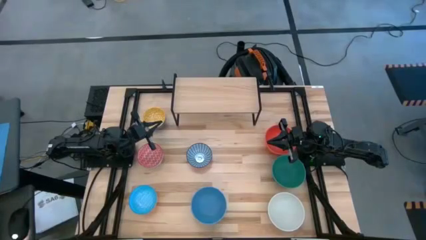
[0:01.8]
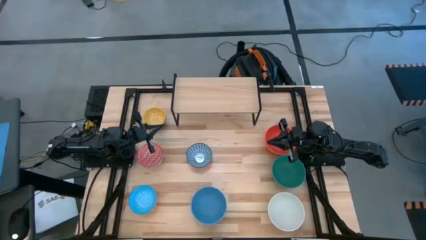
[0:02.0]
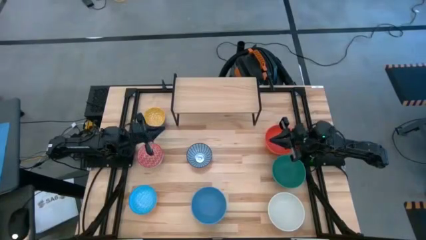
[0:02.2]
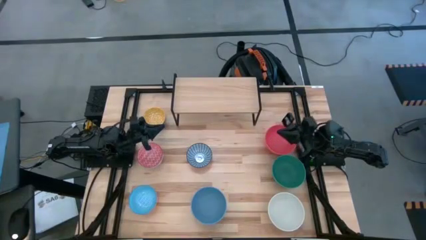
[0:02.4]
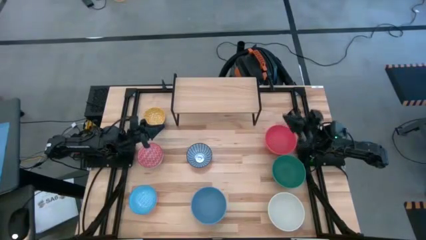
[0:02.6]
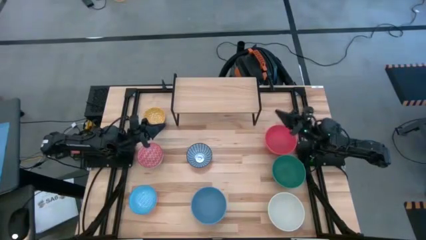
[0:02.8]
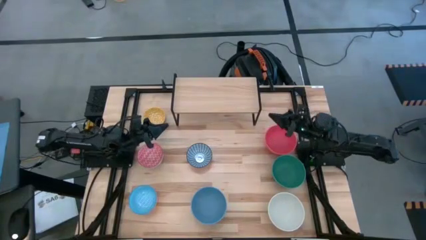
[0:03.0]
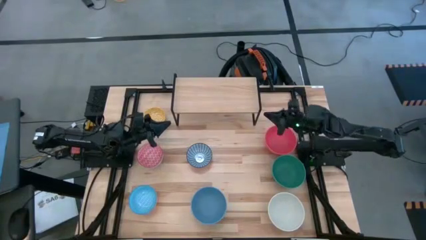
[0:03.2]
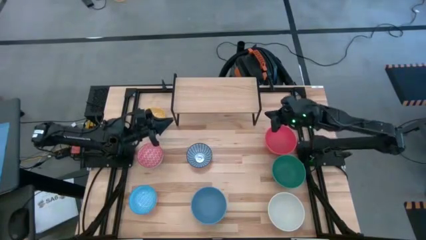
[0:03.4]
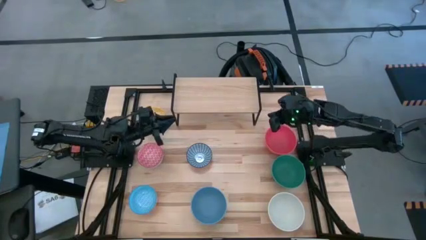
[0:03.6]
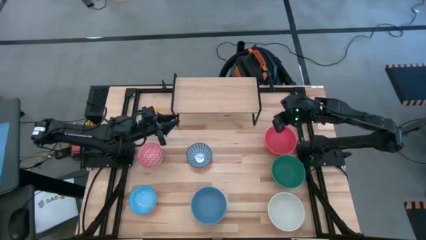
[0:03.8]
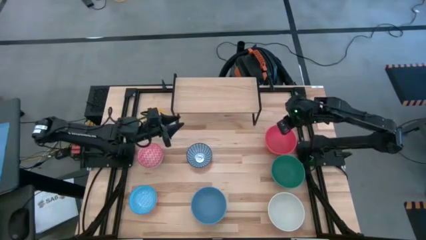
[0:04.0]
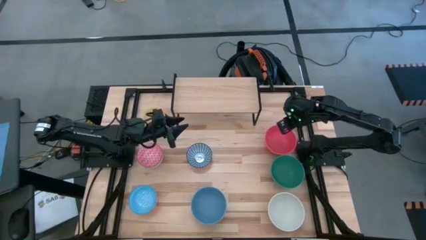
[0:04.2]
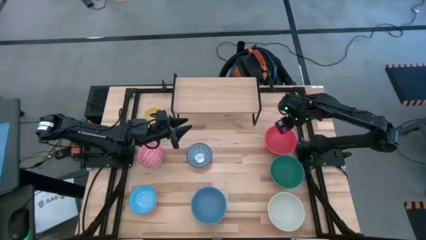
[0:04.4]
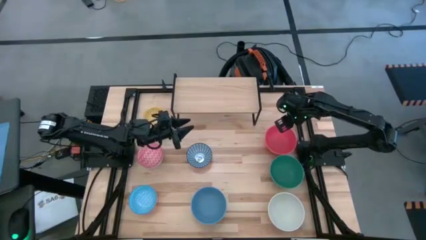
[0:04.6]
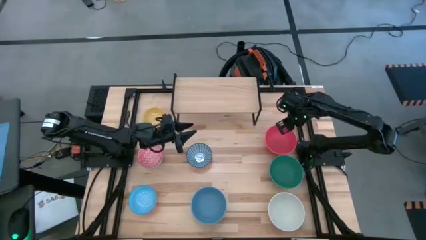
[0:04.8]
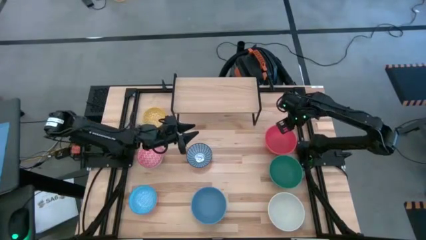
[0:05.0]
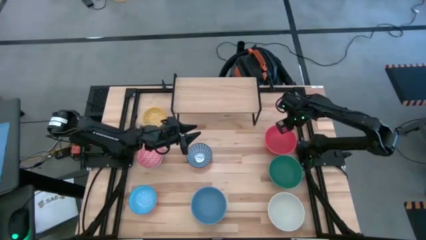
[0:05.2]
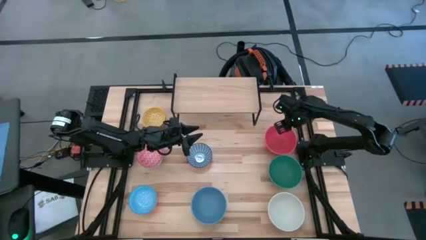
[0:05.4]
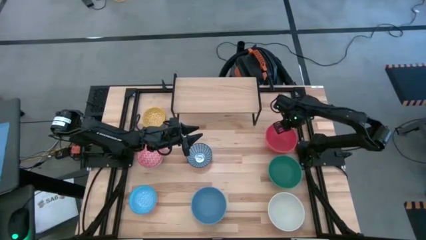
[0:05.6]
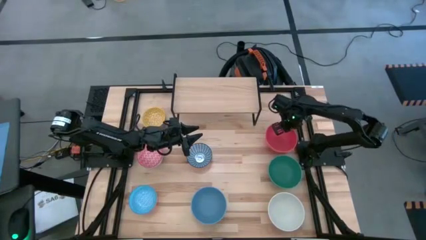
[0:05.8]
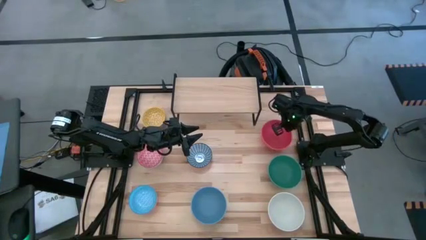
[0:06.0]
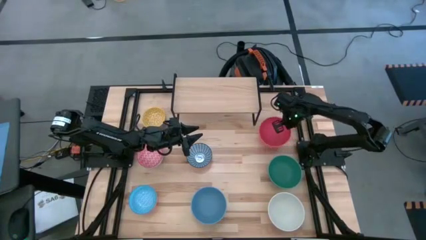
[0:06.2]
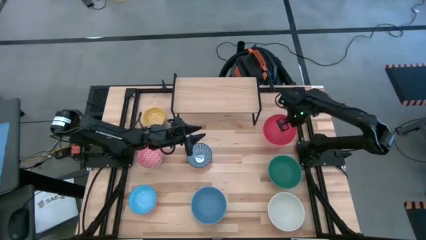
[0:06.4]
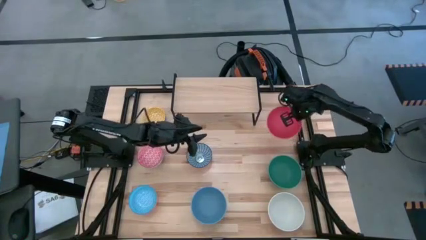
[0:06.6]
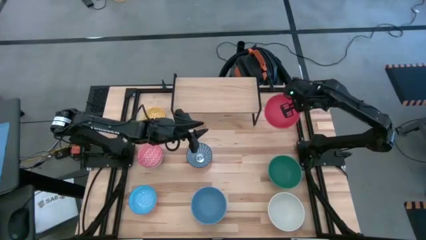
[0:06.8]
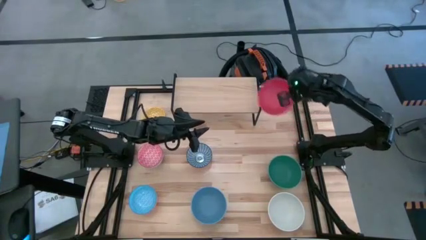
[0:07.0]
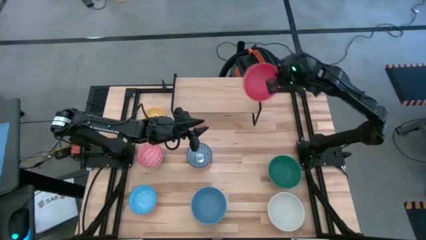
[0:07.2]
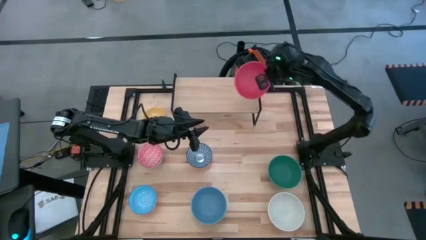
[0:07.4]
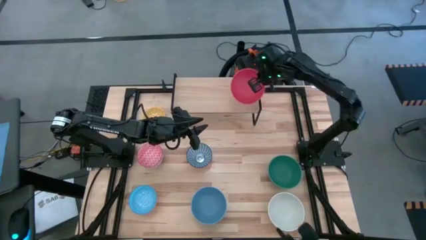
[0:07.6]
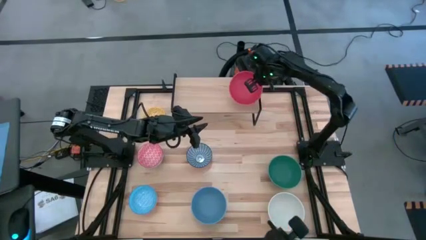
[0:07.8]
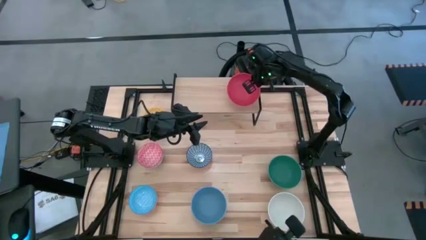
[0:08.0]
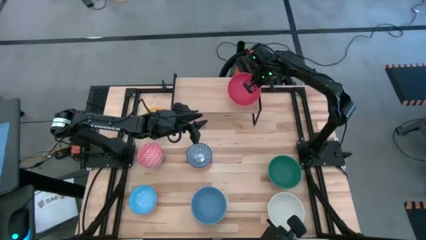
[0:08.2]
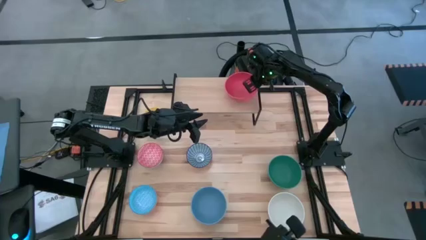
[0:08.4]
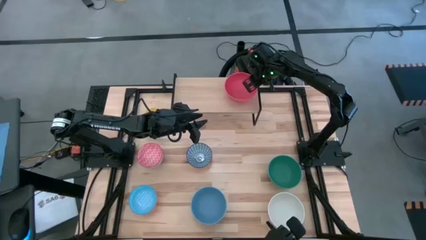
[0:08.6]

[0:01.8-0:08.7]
Task: Place and stack bowls onto a shelf
Put the red bowl on the shelf

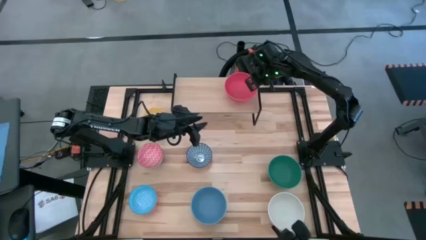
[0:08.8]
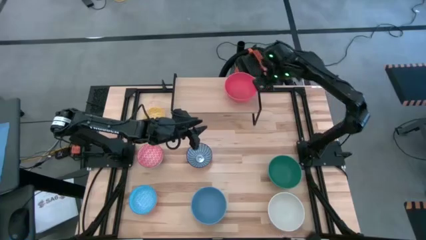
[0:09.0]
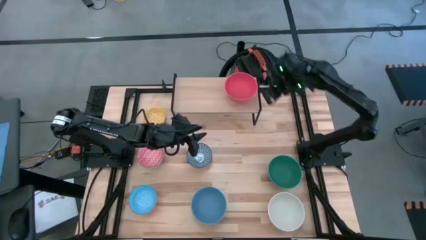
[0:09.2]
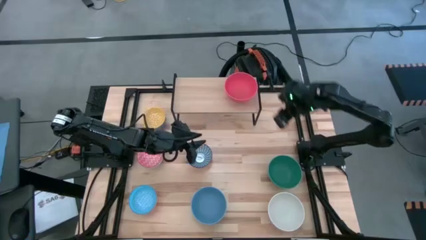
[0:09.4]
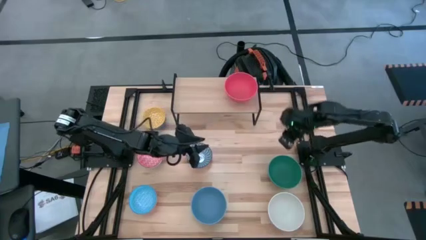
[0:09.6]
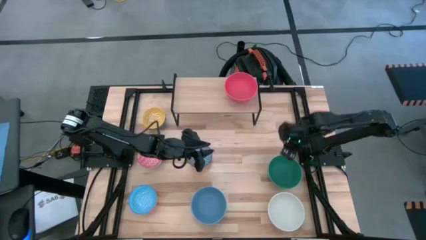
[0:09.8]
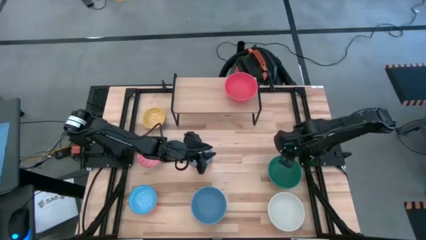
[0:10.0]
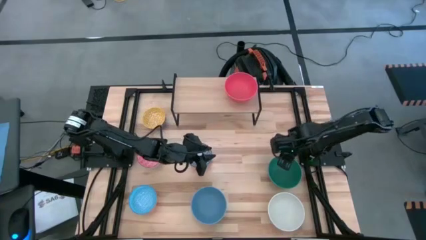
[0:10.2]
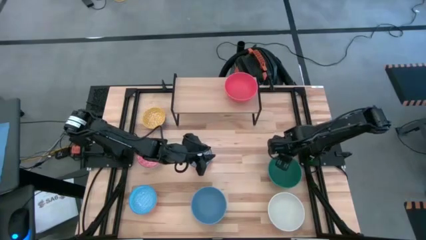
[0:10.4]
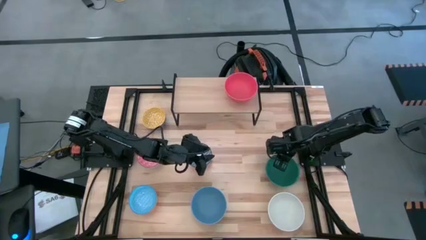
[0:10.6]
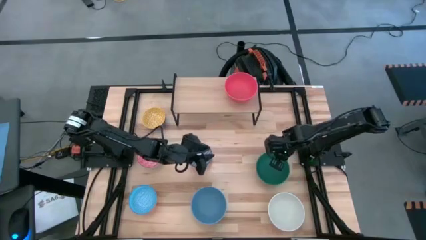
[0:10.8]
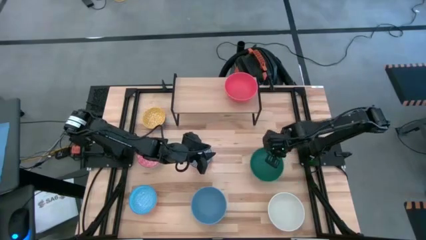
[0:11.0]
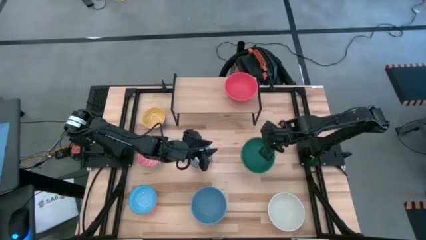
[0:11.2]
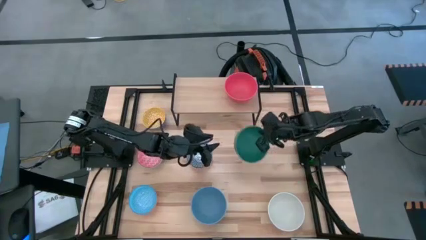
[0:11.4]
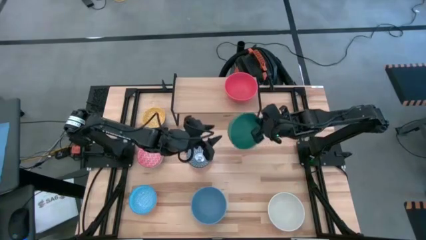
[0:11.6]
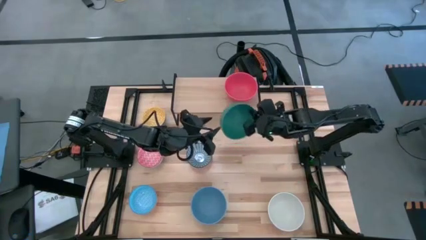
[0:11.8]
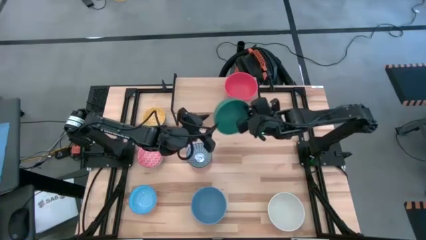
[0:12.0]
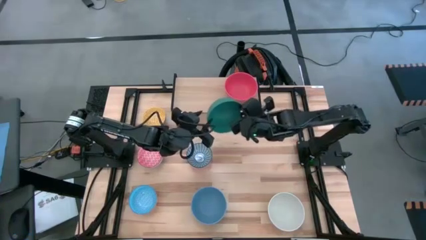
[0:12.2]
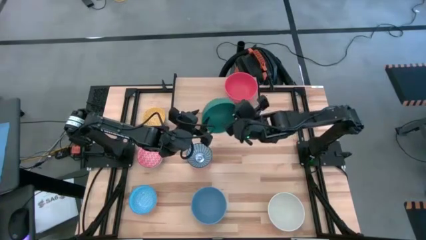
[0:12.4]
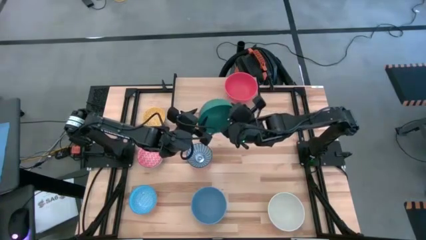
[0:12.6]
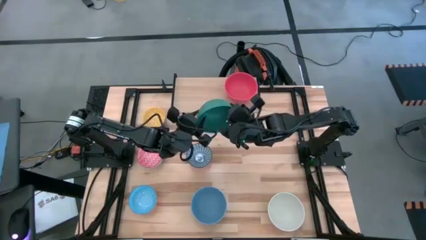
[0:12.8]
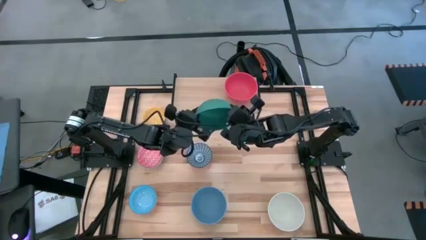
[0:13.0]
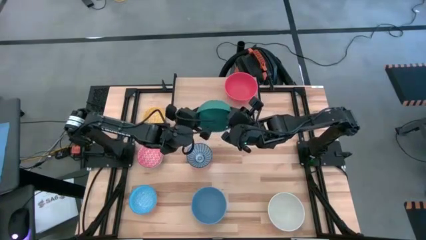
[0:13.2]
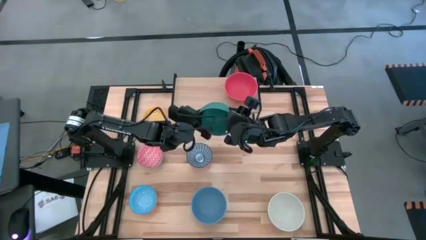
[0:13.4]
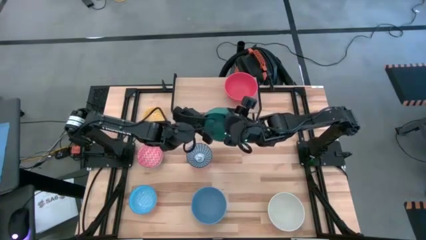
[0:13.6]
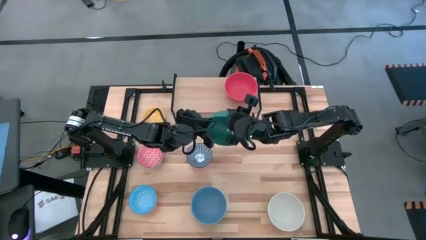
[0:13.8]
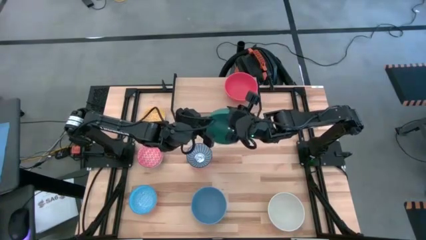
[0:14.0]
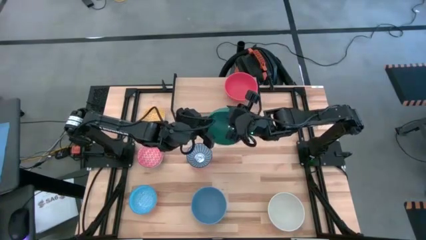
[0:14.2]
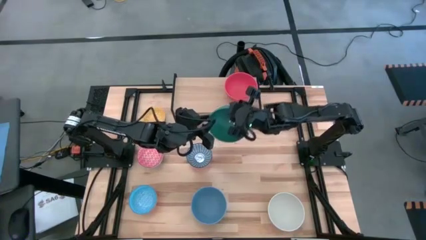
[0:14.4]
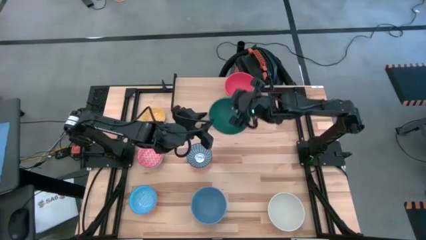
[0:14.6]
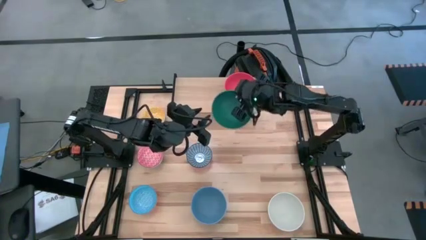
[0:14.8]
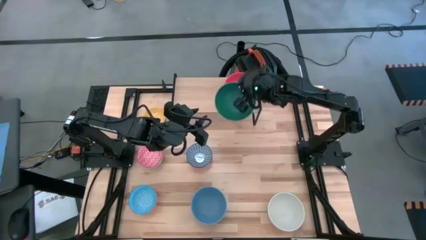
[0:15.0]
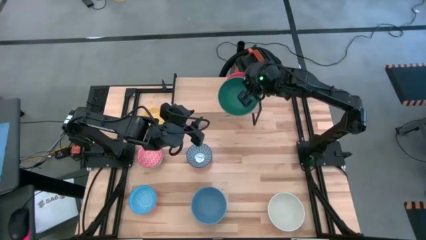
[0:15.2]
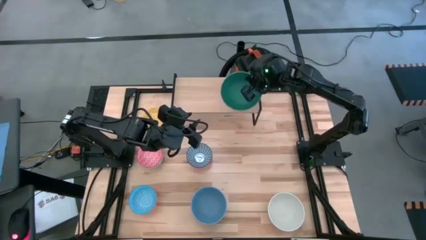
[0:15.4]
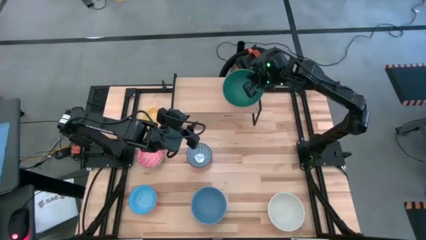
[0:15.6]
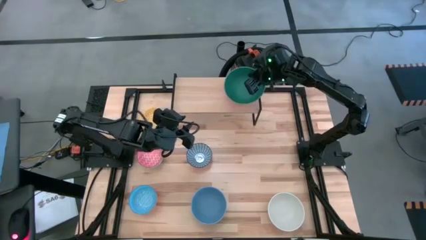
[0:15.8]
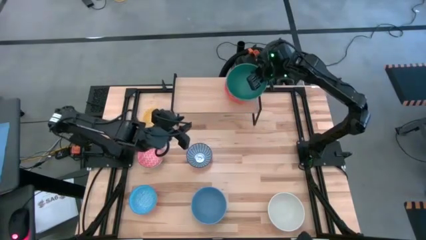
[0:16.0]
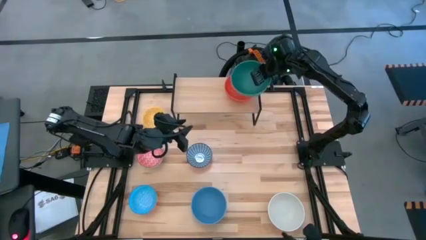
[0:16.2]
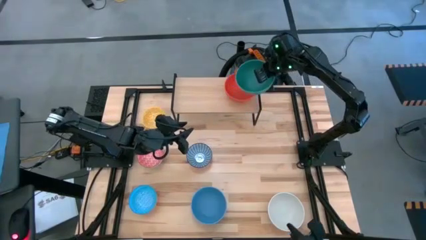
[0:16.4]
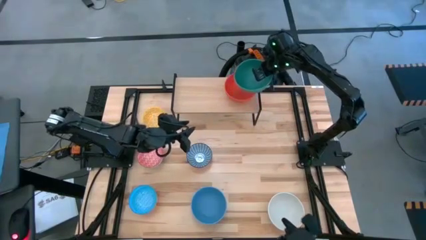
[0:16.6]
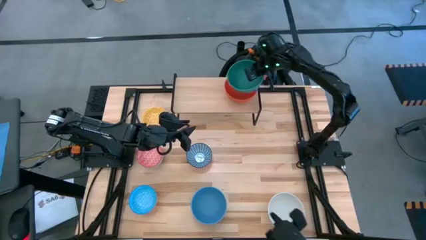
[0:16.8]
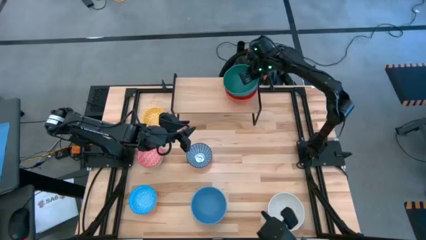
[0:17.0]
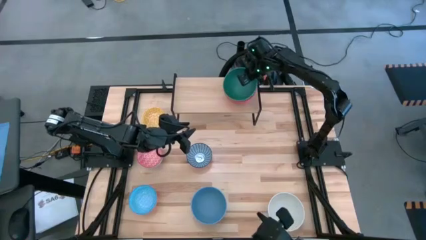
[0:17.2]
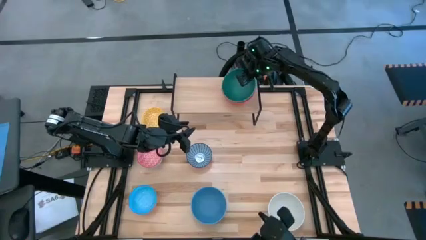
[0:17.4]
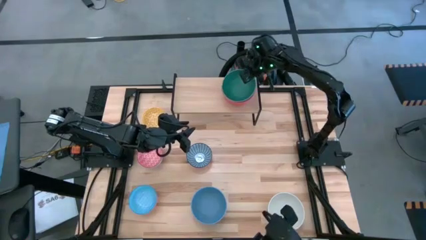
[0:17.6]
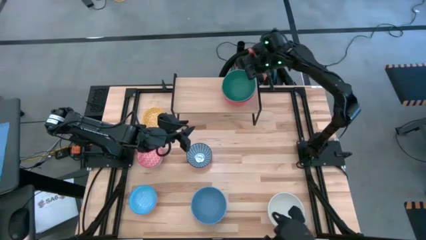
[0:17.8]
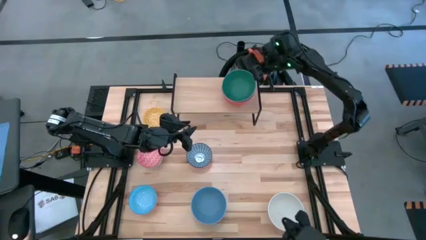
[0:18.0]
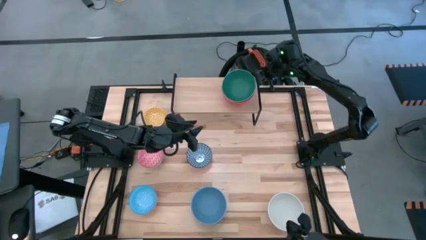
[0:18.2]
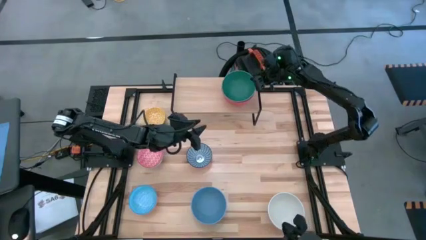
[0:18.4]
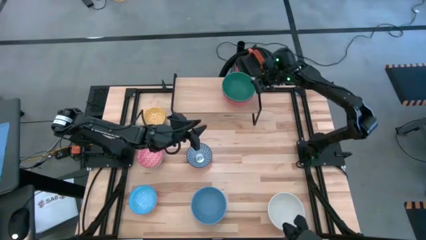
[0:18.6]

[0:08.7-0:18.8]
Stack the green bowl on top of the red bowl on the shelf
